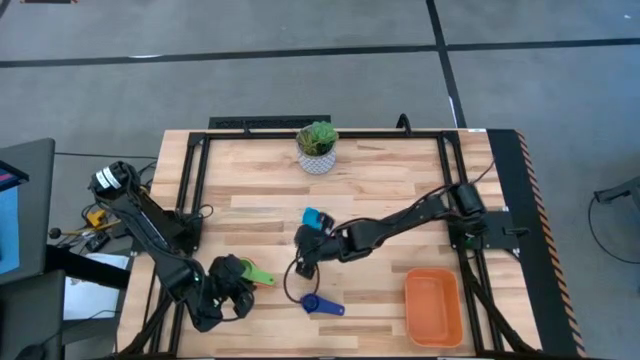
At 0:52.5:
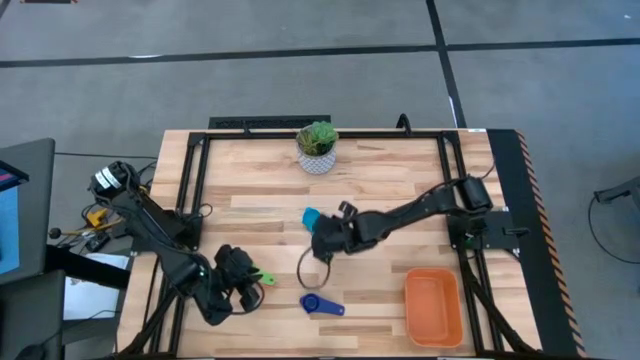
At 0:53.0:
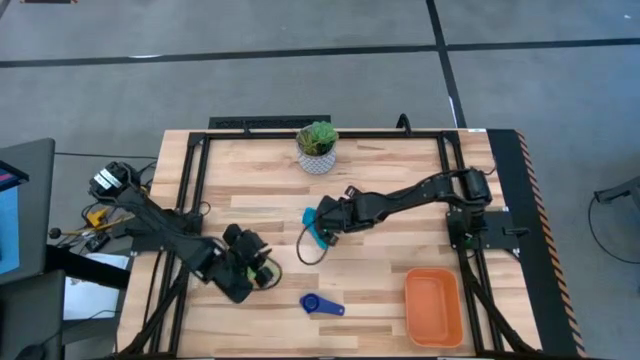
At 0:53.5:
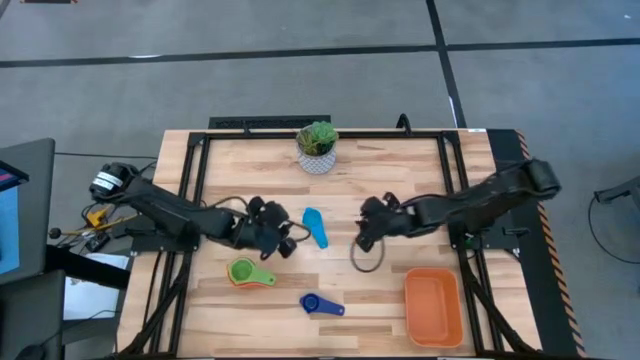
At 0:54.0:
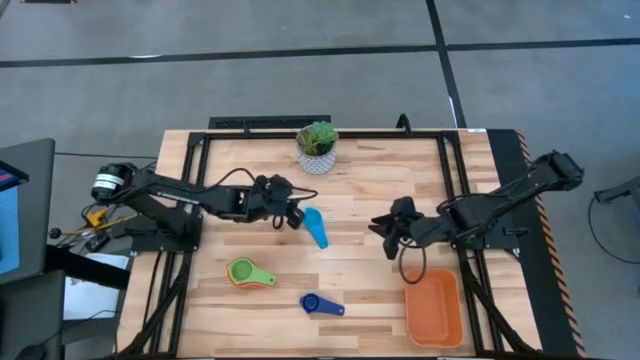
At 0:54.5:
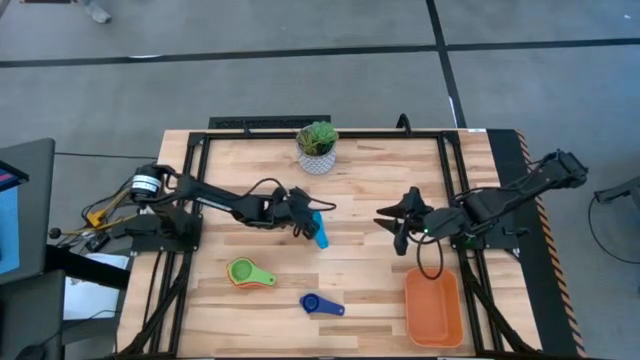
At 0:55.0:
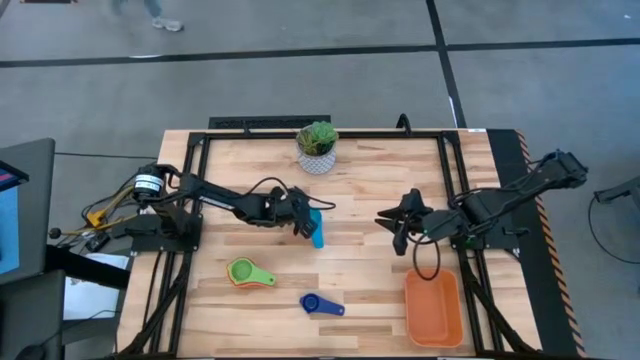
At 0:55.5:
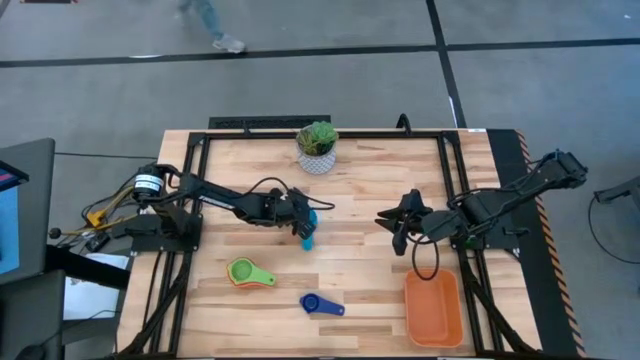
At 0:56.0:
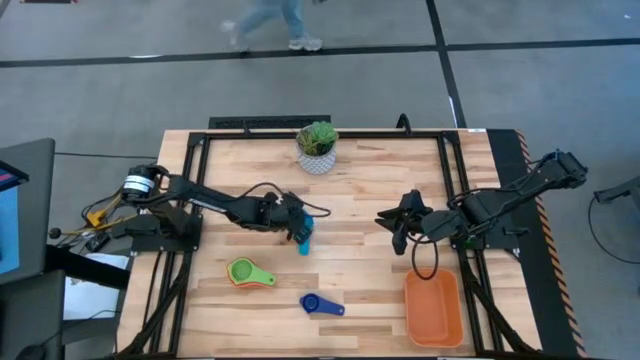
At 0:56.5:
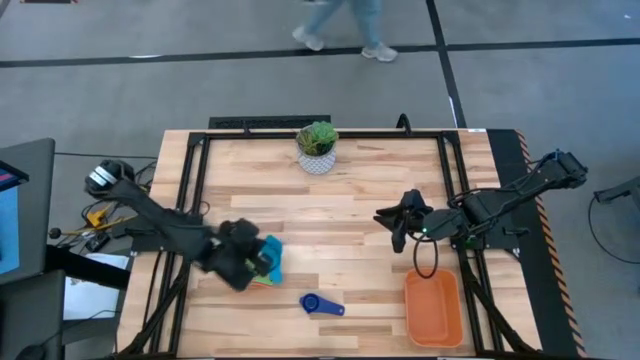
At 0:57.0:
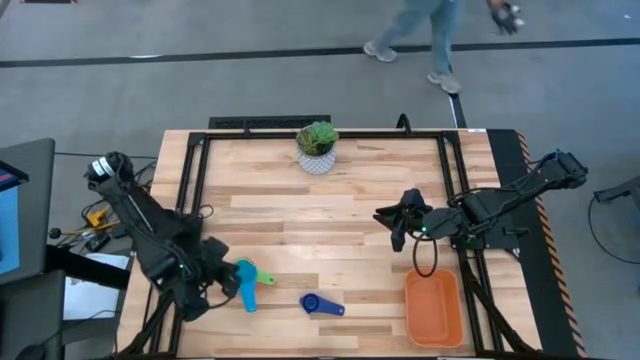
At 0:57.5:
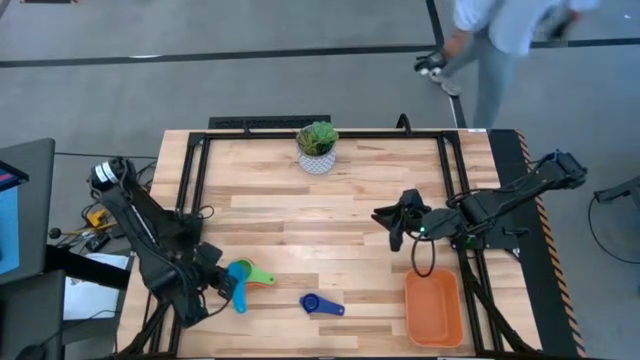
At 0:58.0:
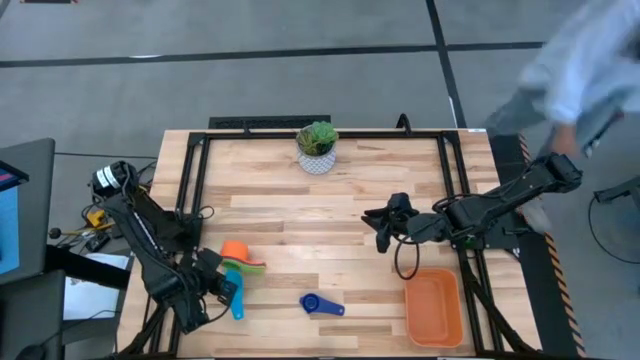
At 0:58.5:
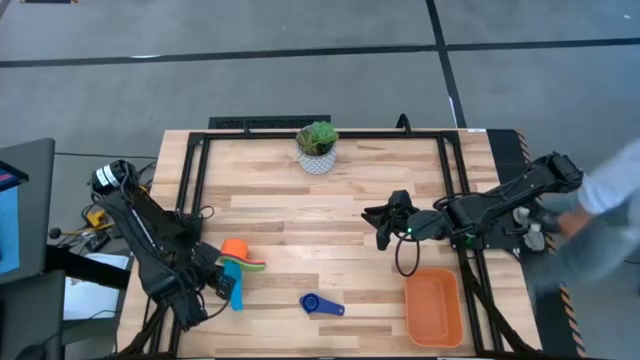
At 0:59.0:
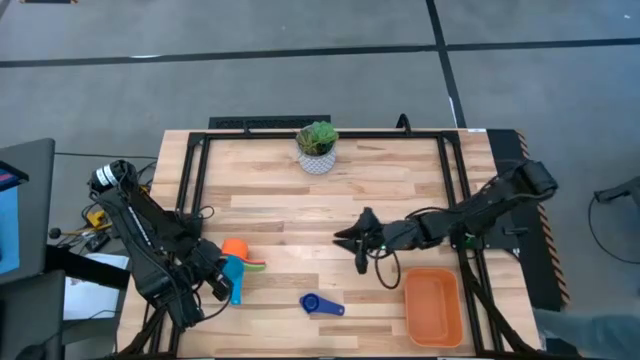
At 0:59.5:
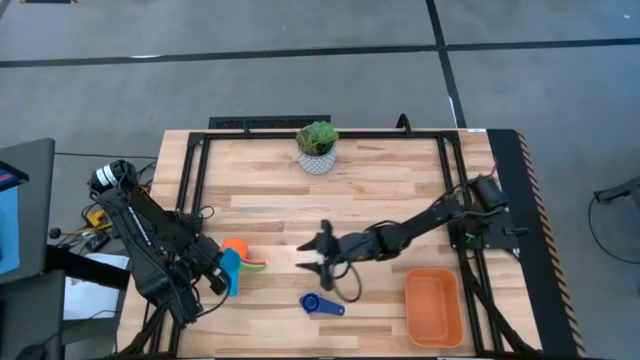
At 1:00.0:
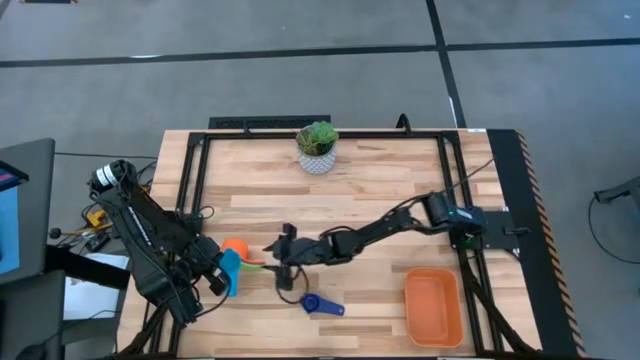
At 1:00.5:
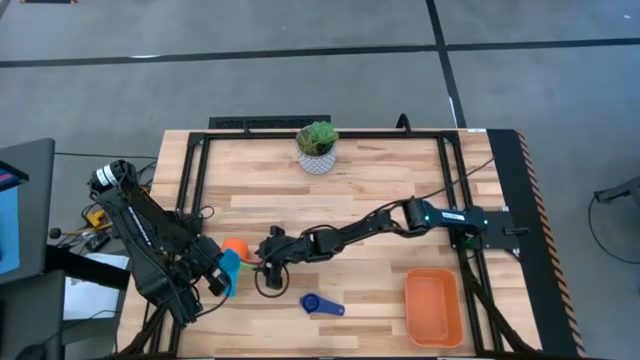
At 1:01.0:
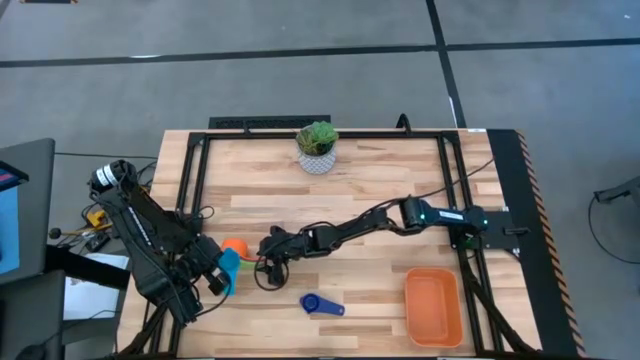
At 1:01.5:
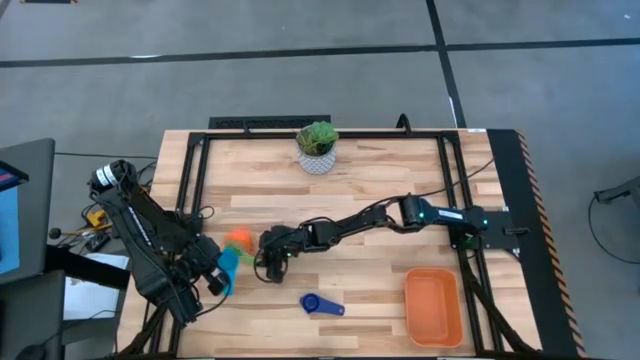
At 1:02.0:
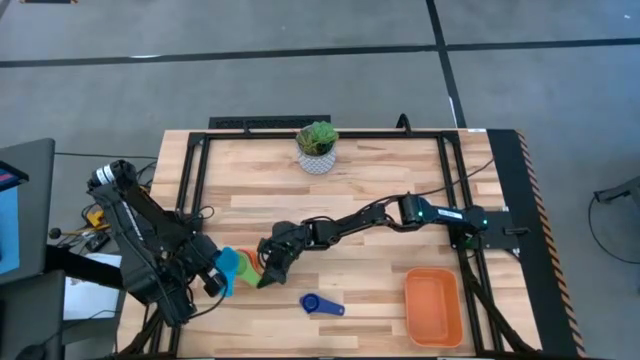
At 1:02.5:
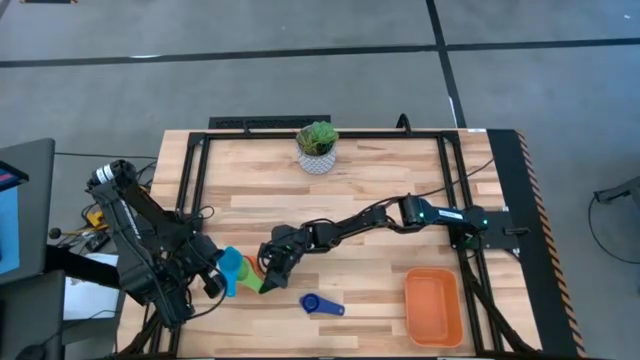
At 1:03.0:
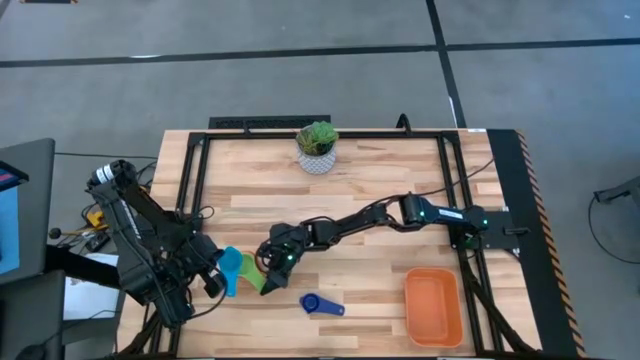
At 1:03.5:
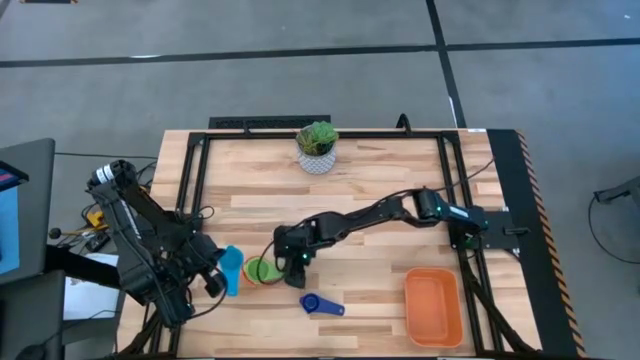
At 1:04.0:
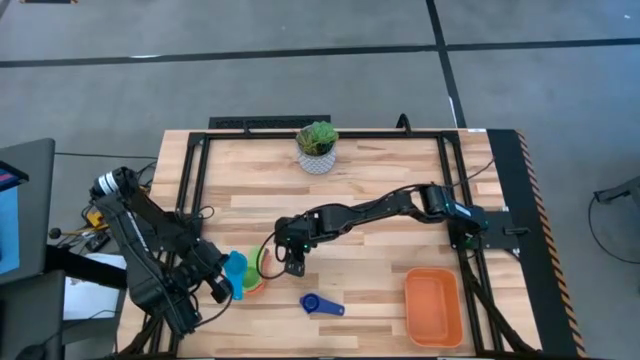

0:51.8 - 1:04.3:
Task: Nest measuring cups in basket
Stack the blue measuring cup on top of the green measuring cup

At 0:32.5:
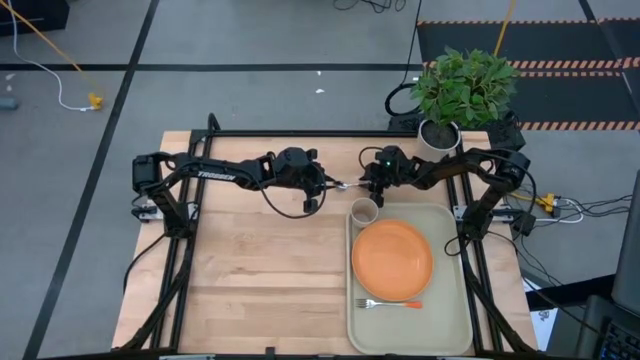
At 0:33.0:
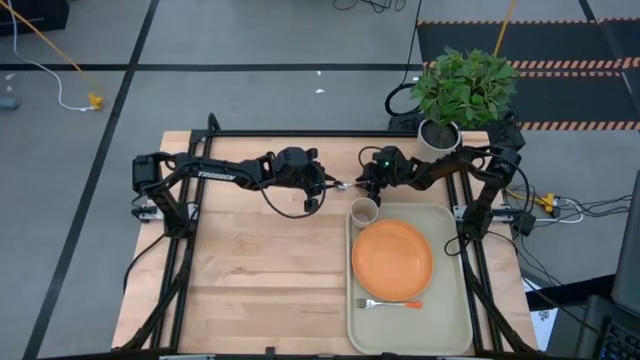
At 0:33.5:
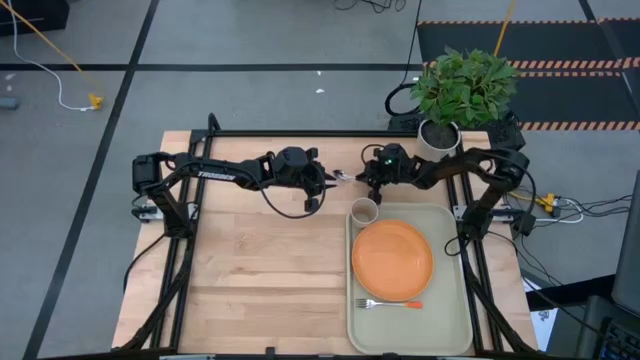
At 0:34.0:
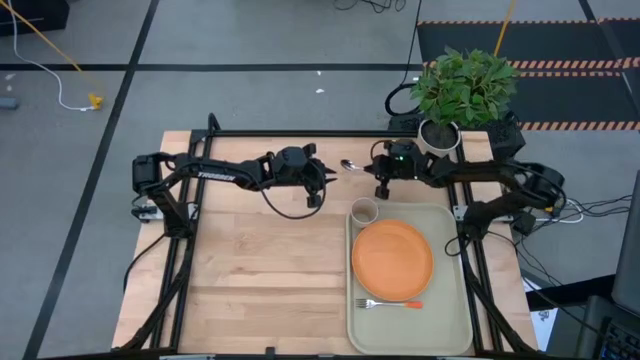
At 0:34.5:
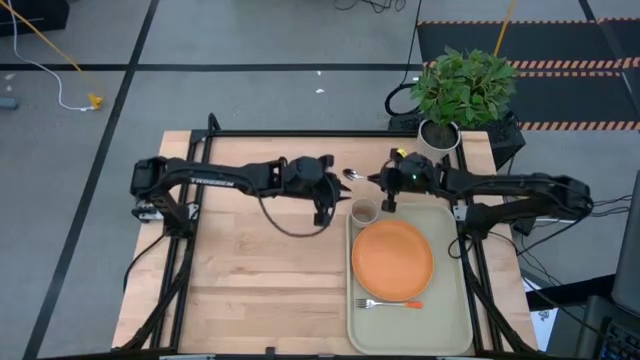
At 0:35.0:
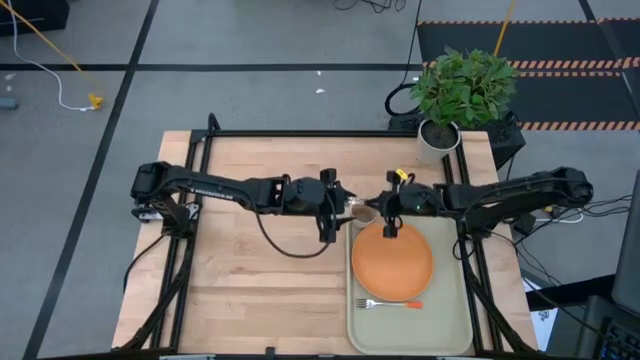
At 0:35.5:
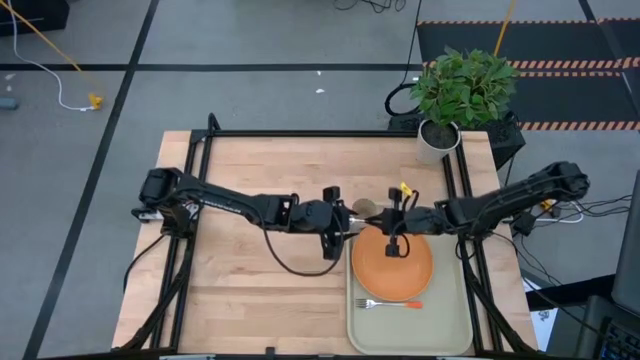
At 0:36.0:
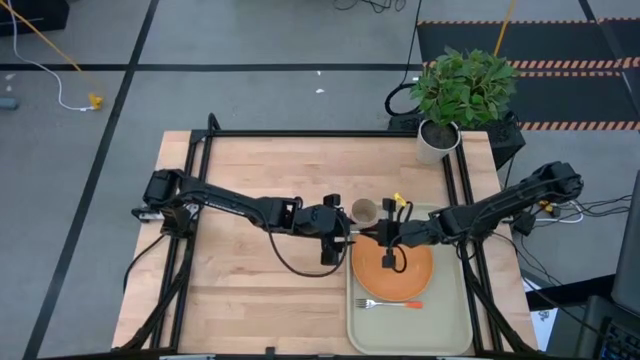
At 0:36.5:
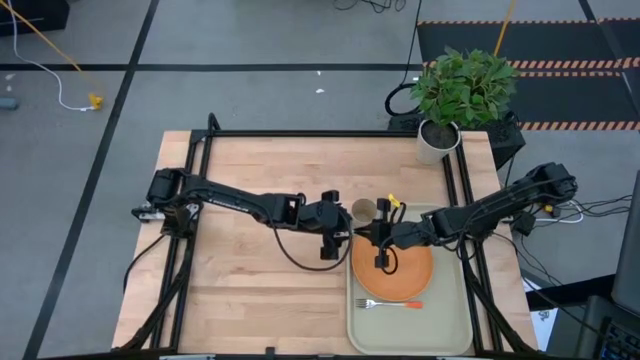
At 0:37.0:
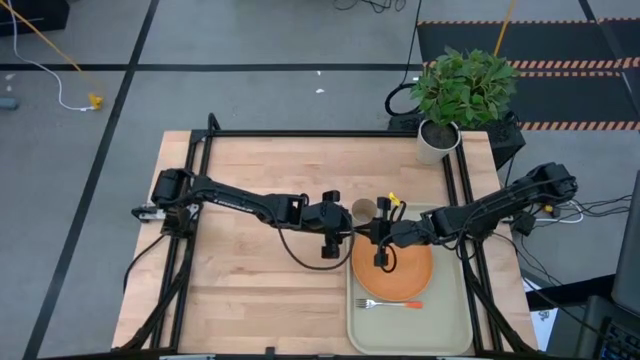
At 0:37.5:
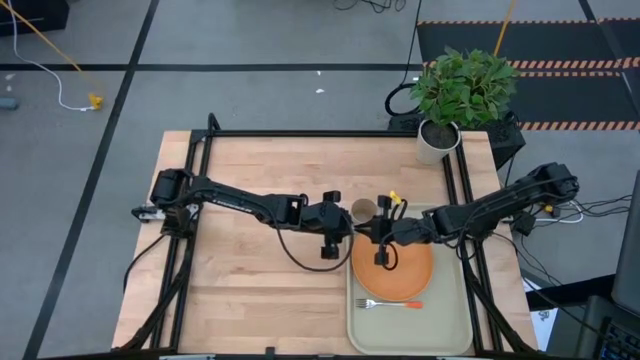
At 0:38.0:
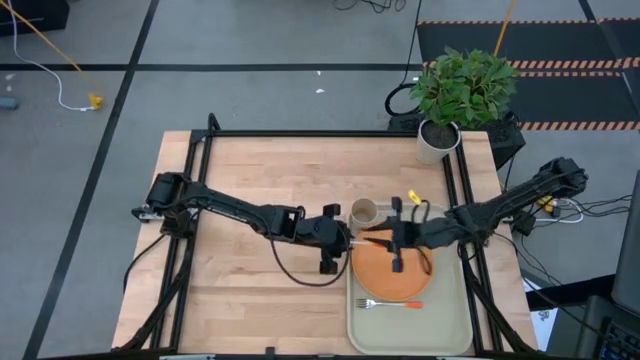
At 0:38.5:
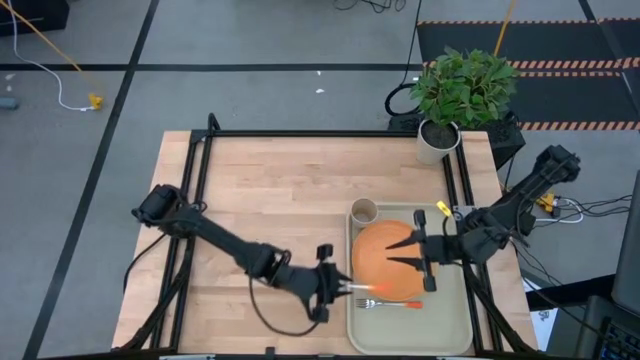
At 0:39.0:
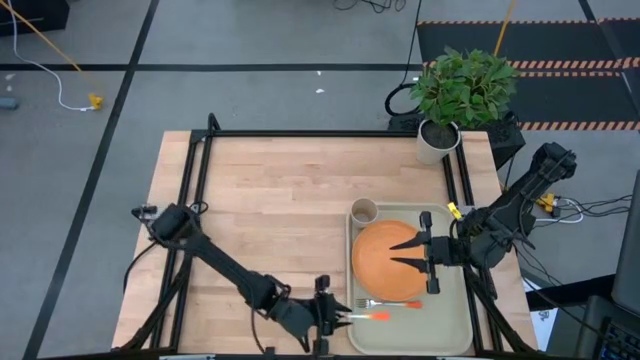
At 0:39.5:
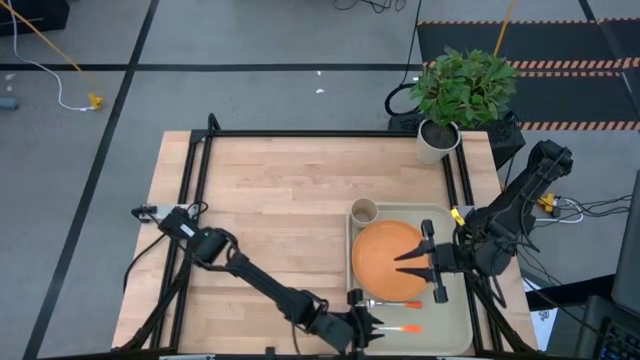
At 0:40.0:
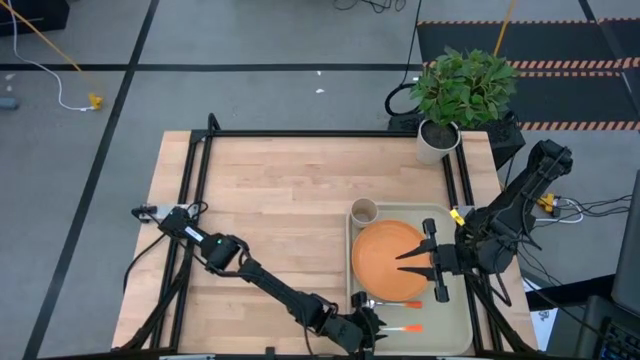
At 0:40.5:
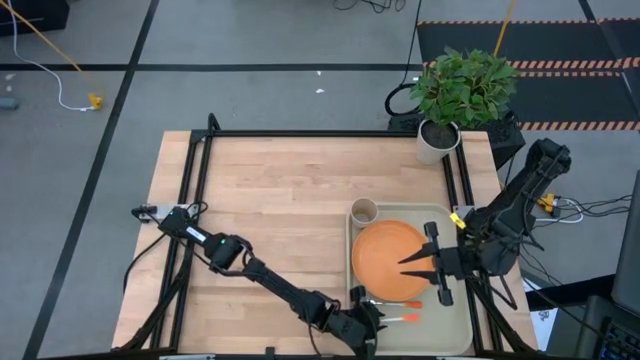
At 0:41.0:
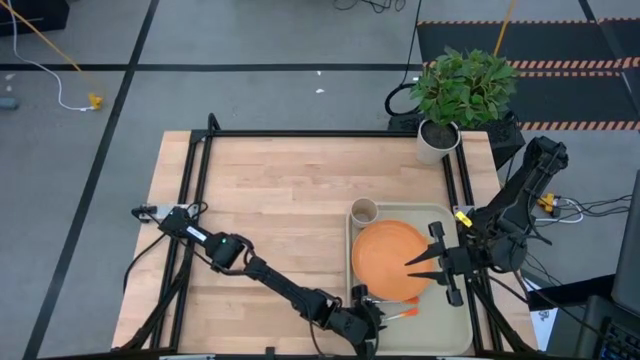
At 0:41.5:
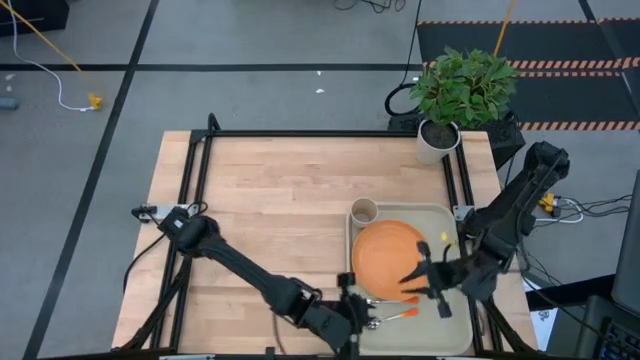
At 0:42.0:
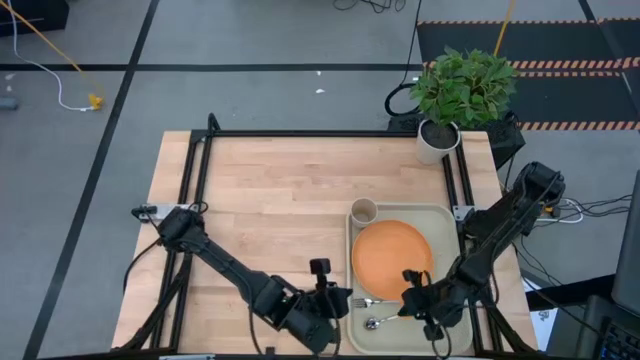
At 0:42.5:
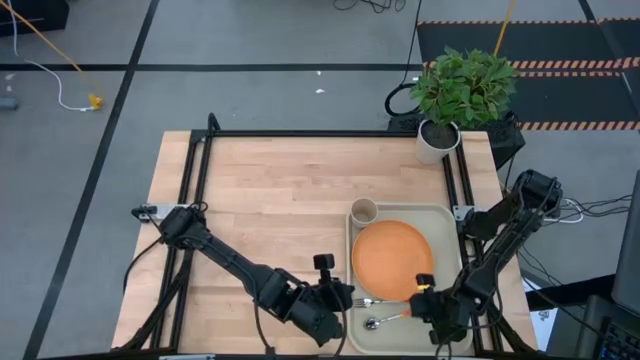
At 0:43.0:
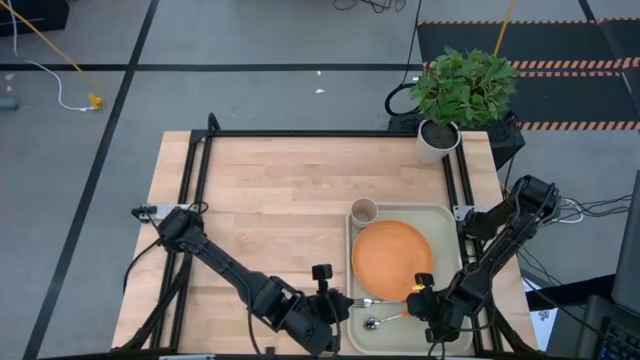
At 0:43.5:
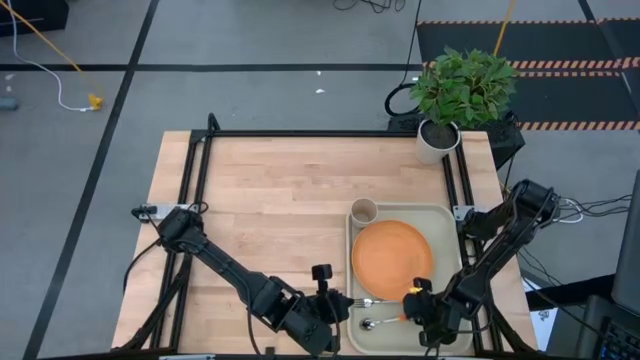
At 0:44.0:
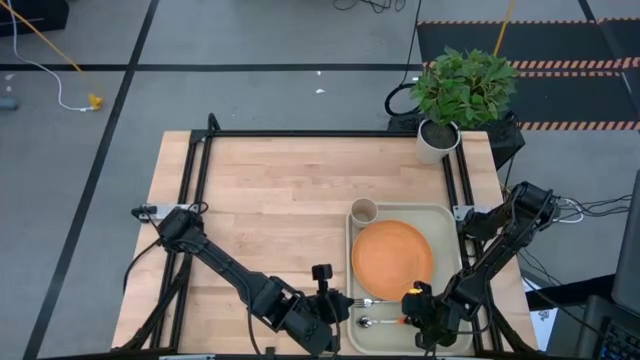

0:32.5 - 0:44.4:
Task: Pick and place plate/cup/fork/spoon on tray
Put the white orange spoon on the left side of the white orange fork
